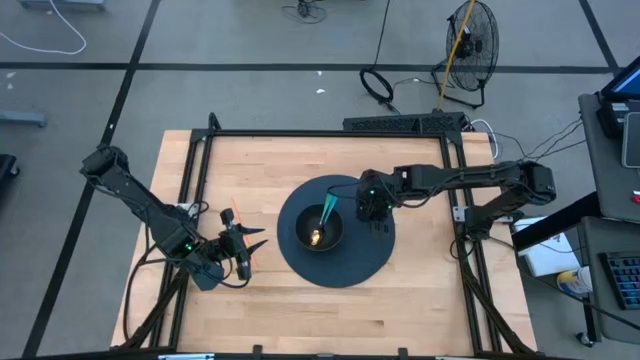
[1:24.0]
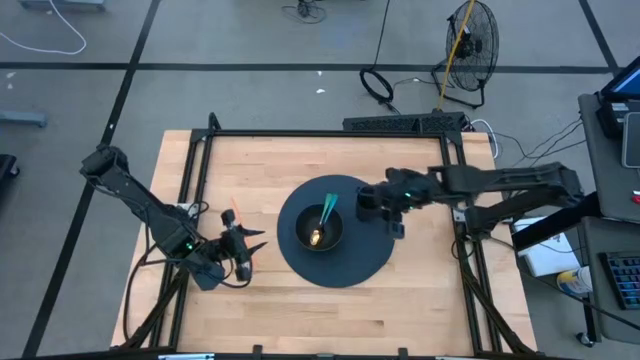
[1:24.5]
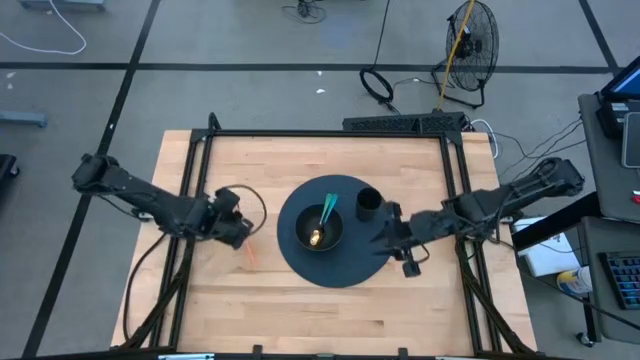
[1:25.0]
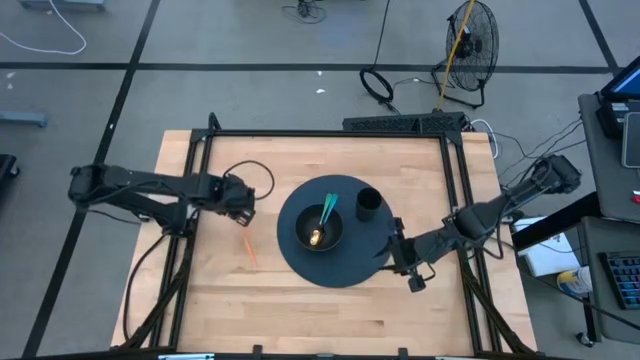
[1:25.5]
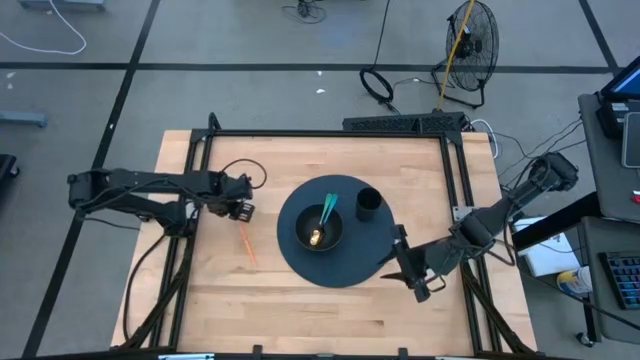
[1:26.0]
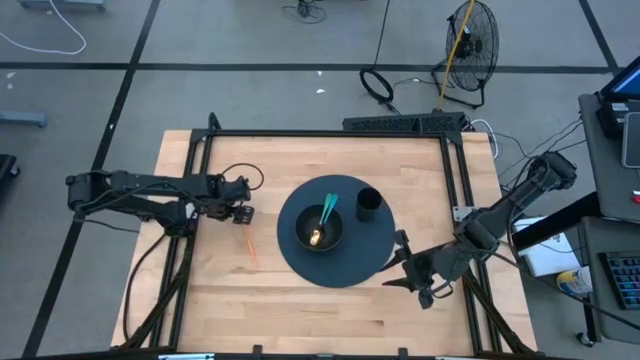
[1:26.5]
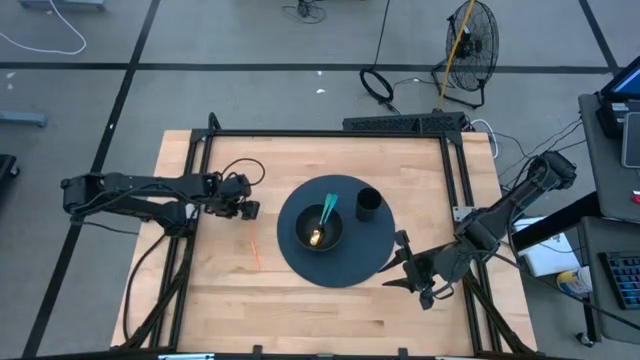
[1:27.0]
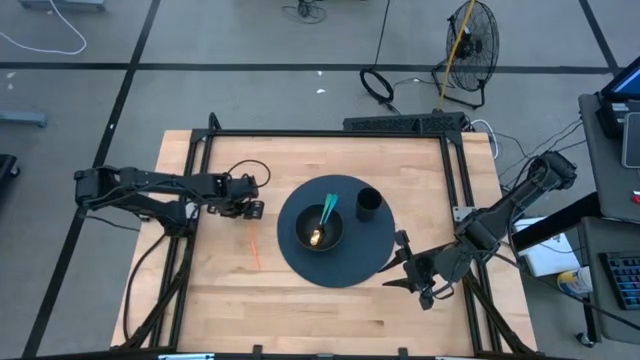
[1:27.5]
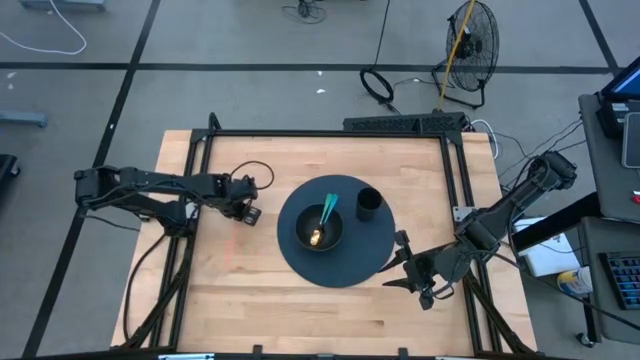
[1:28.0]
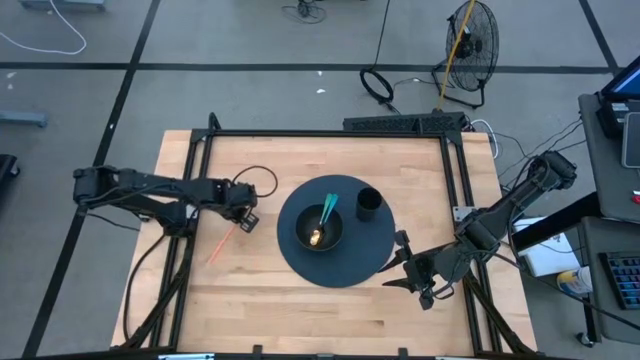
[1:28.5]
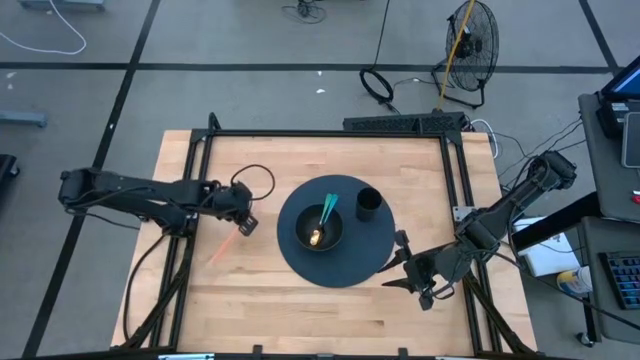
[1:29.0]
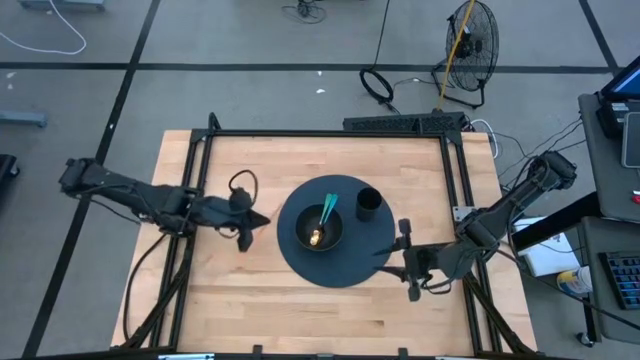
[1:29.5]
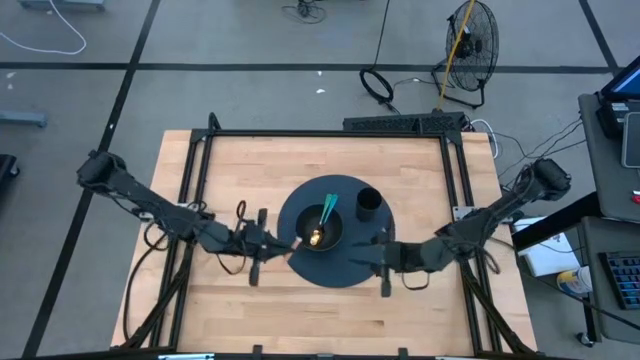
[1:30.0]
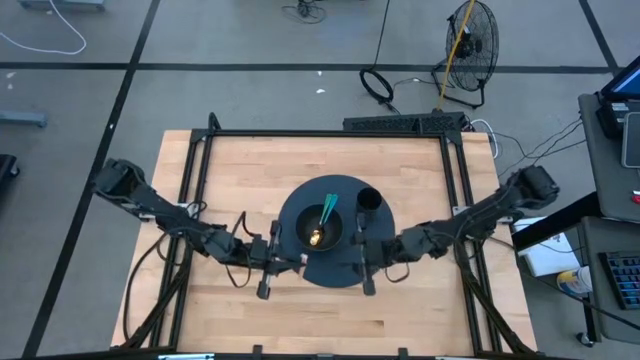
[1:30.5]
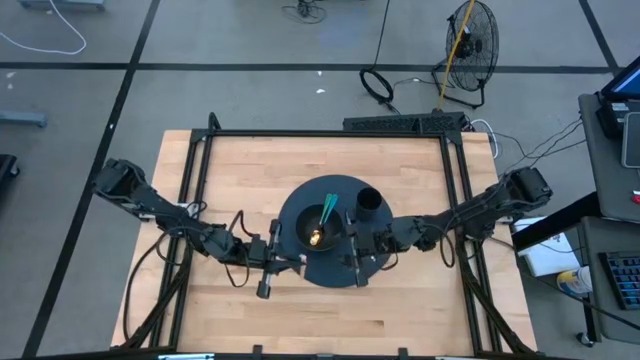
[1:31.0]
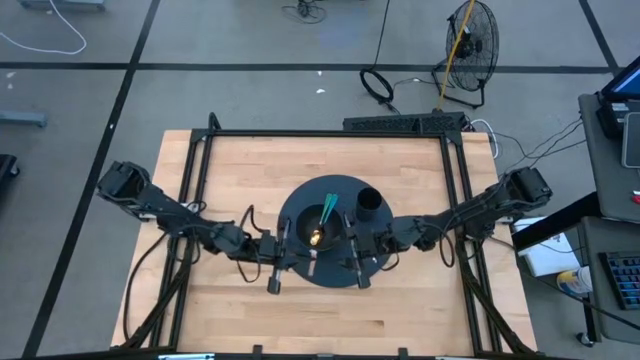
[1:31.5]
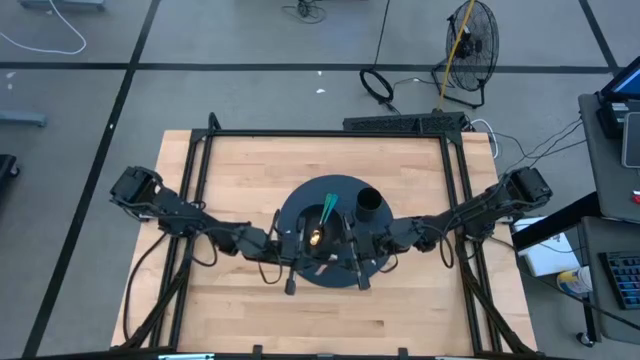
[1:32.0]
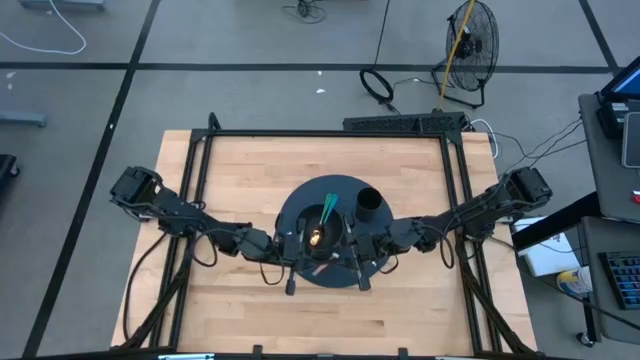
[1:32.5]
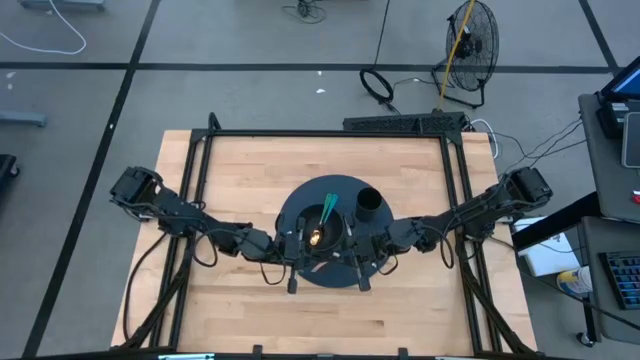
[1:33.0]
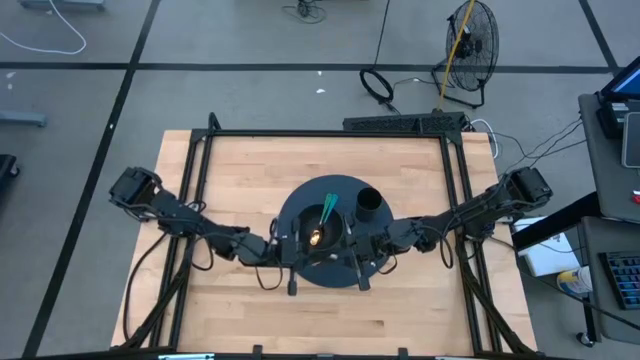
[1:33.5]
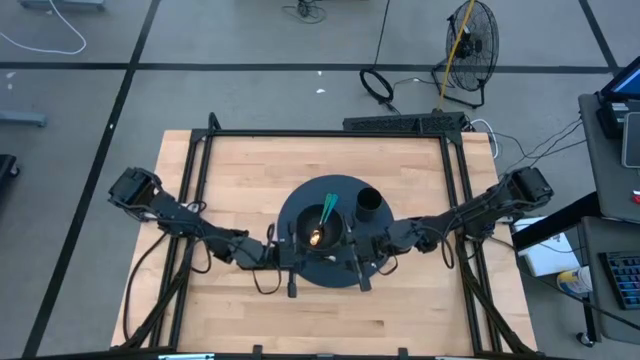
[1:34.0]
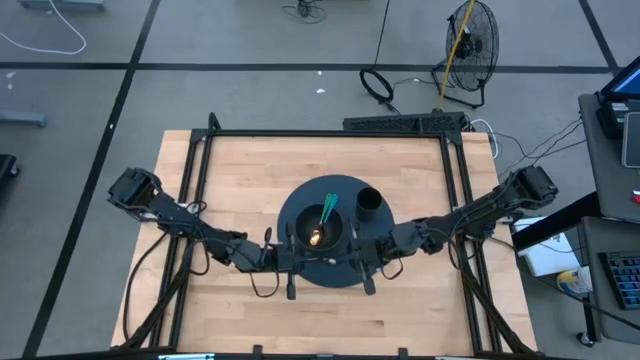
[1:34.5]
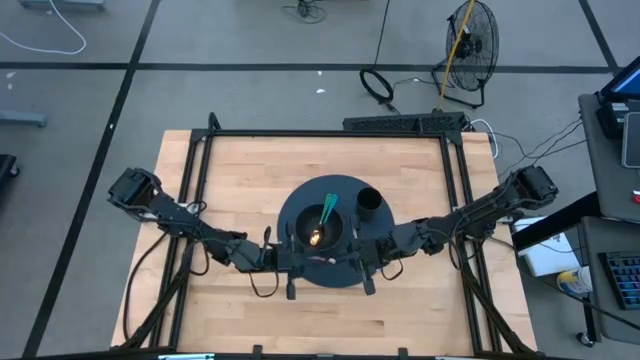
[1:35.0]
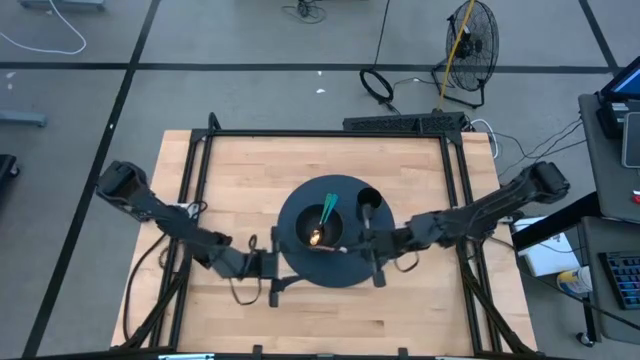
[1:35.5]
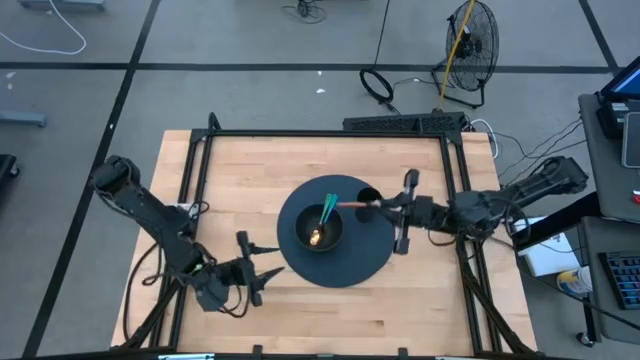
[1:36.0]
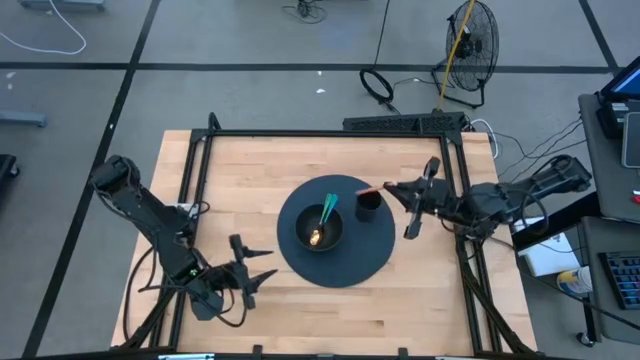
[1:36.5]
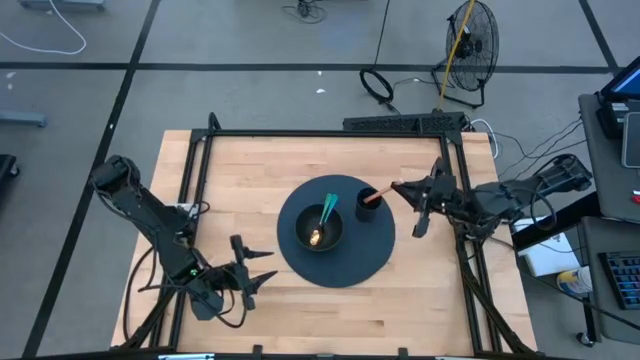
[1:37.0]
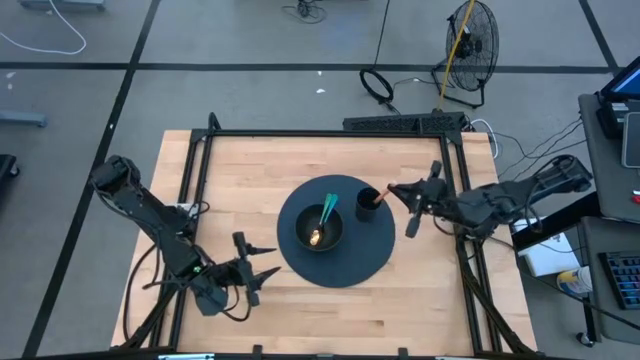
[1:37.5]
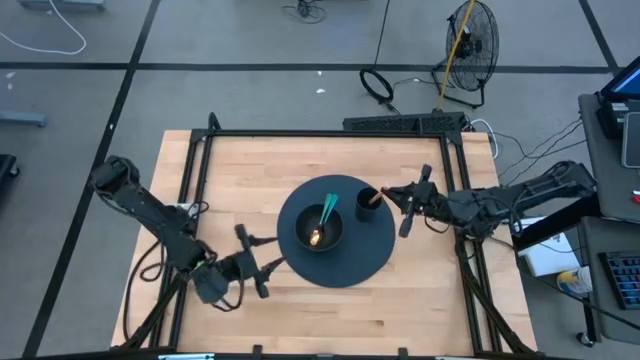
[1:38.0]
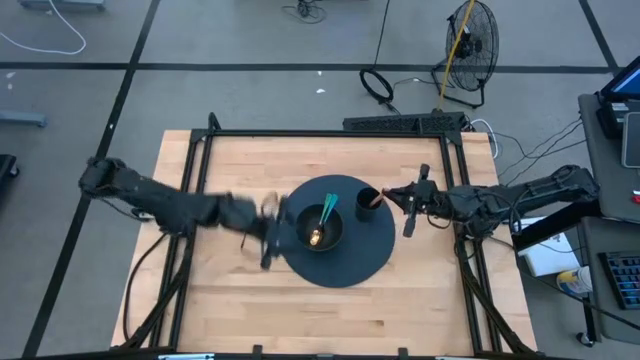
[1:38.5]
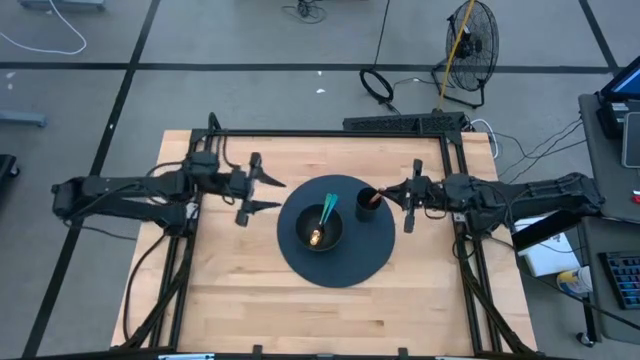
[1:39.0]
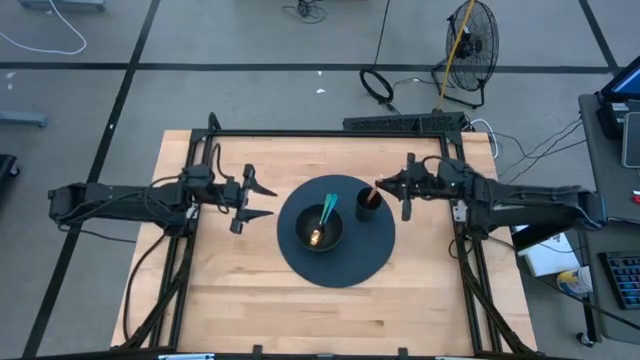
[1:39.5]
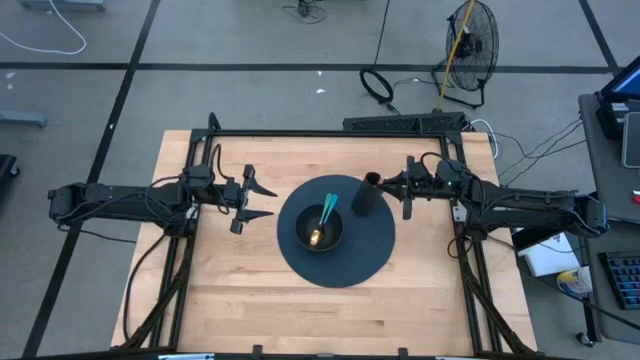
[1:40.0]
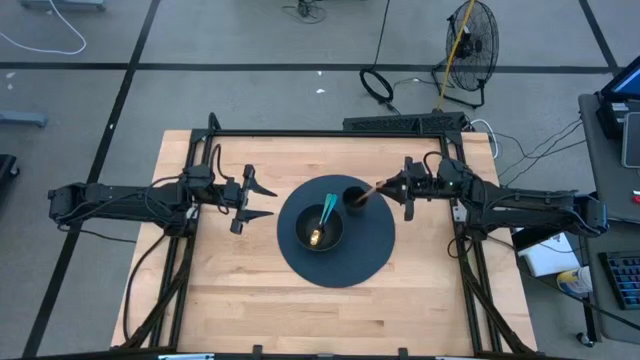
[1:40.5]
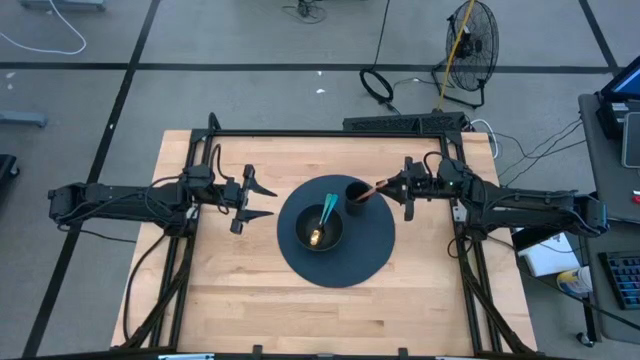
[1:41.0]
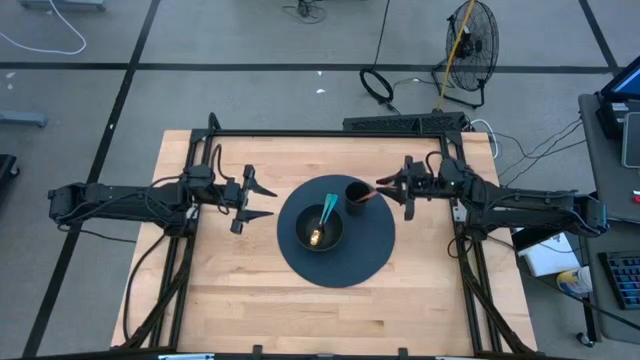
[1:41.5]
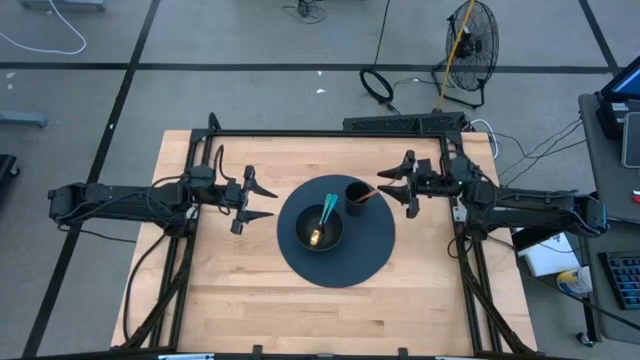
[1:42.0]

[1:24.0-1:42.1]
Task: Pick & Place Utensil
Put the orange straw into the black cup on the blue table placemat

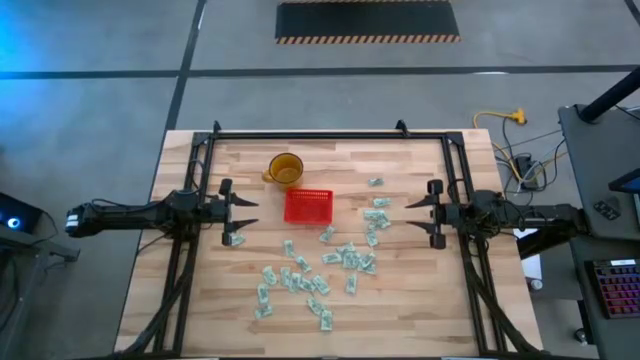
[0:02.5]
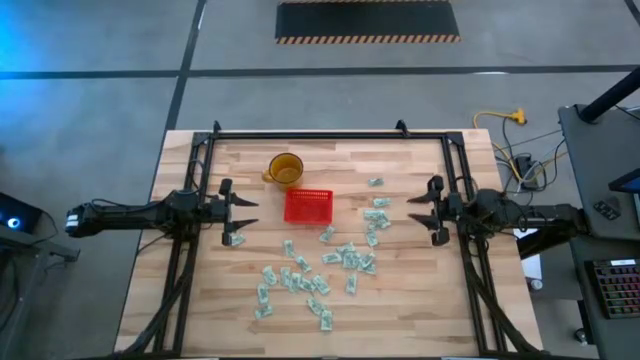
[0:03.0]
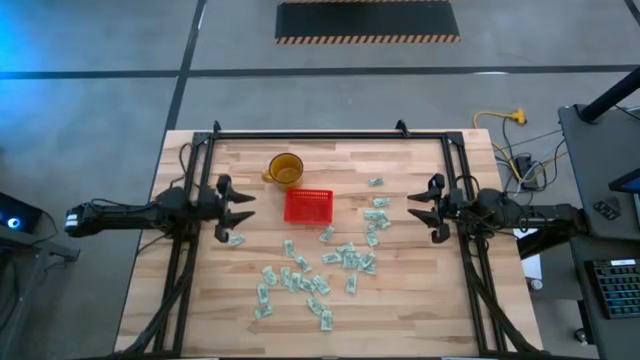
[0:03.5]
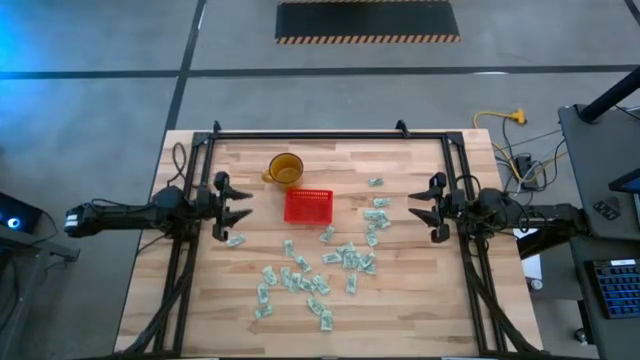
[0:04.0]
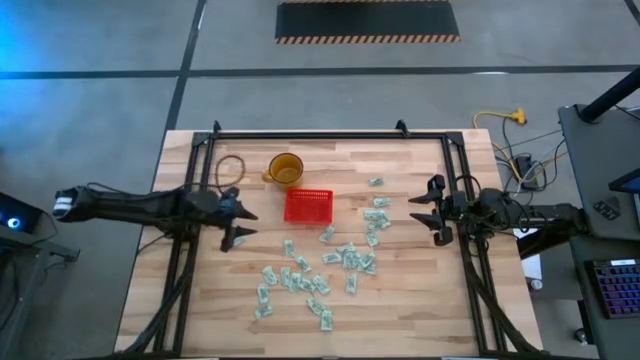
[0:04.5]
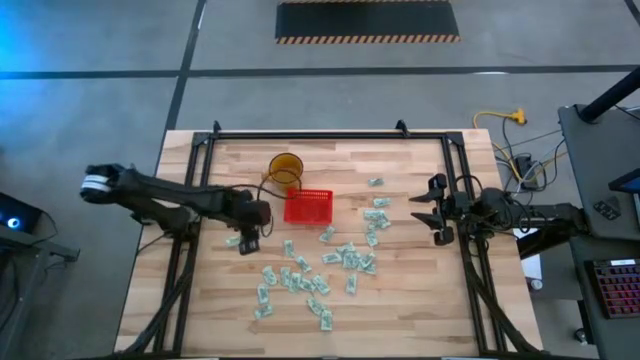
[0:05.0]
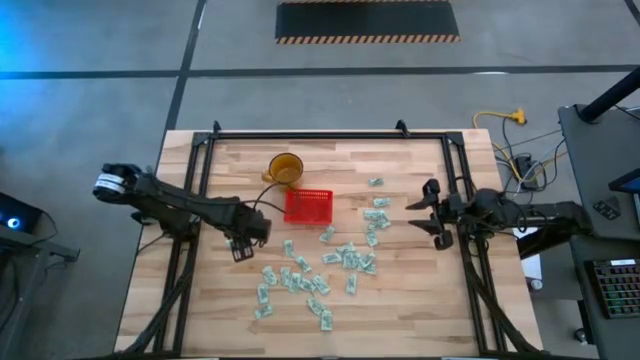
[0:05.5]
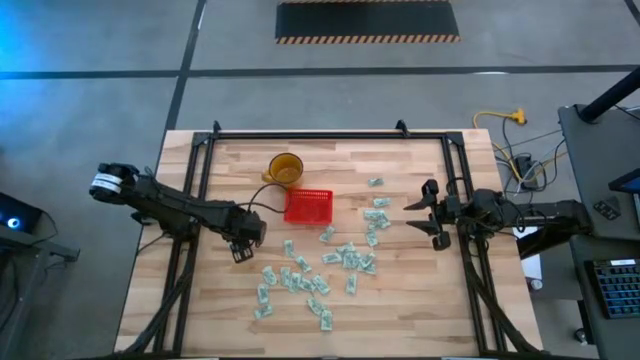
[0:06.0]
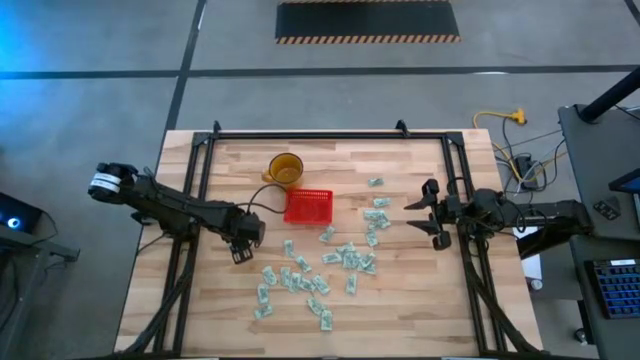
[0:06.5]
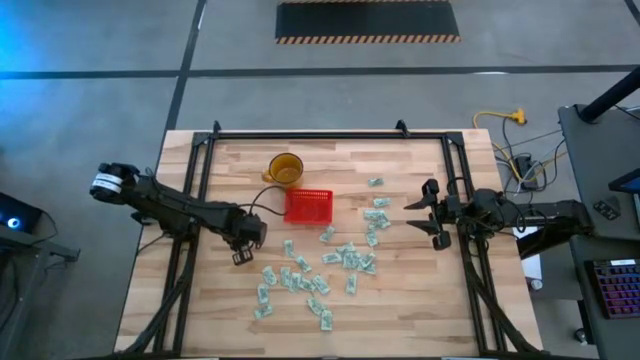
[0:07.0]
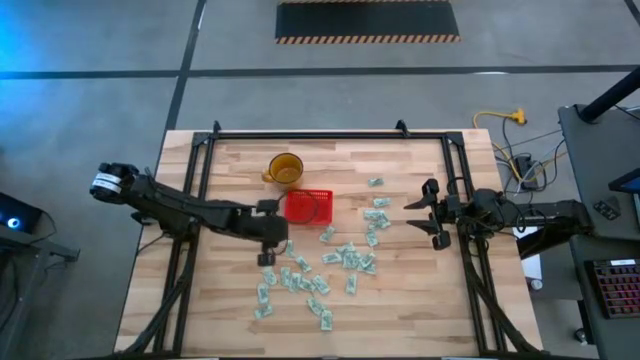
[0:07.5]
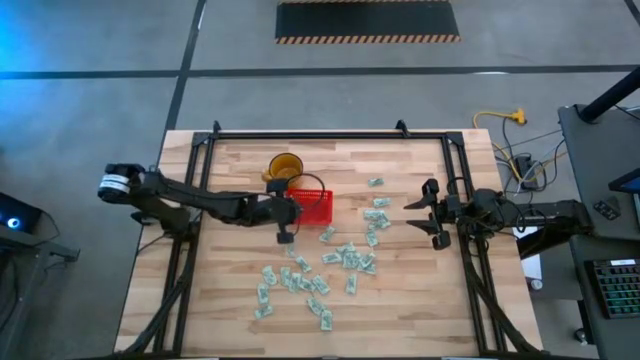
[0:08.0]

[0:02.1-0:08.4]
Task: Pick and place Stevia / Truvia into bins
Put the gray stevia packet into the red basket
